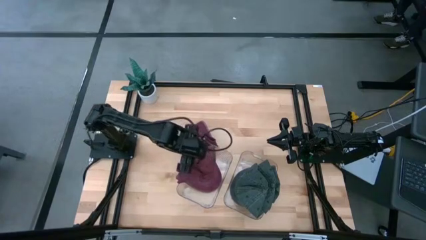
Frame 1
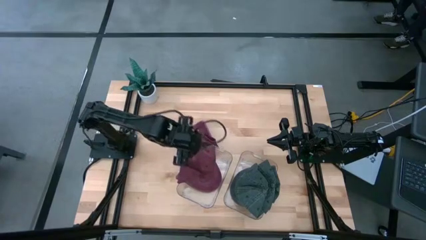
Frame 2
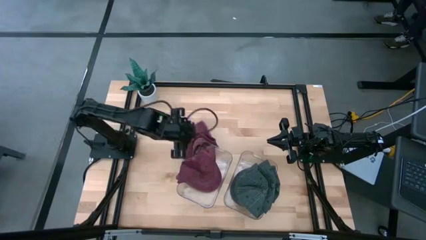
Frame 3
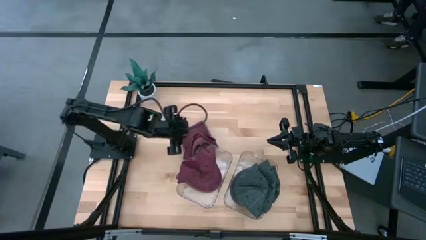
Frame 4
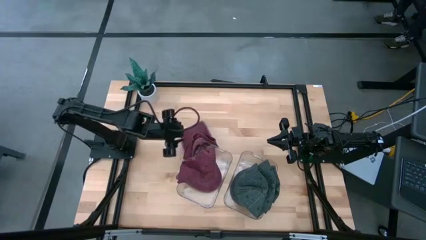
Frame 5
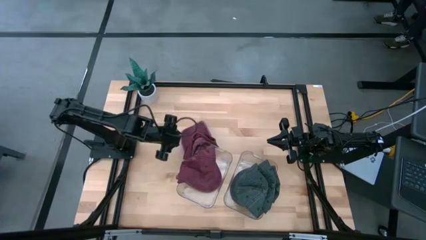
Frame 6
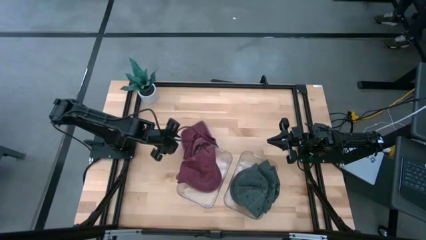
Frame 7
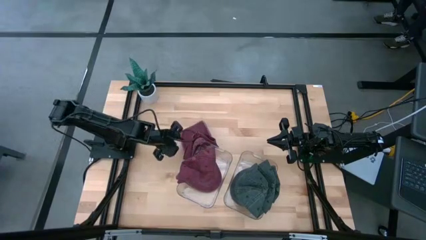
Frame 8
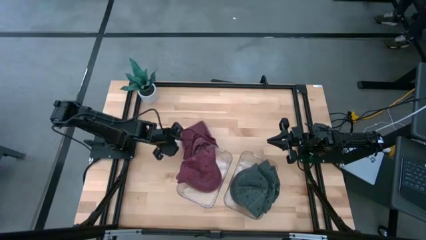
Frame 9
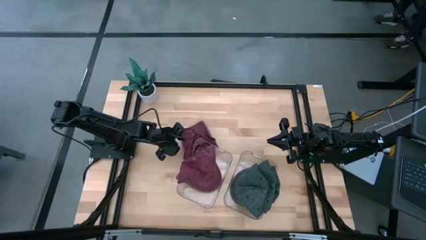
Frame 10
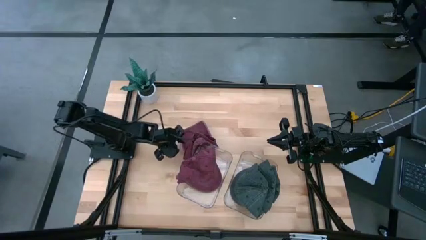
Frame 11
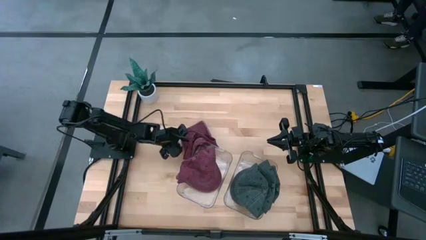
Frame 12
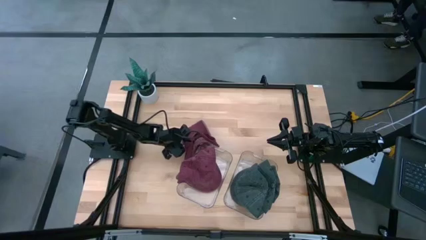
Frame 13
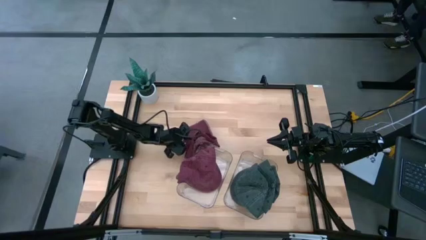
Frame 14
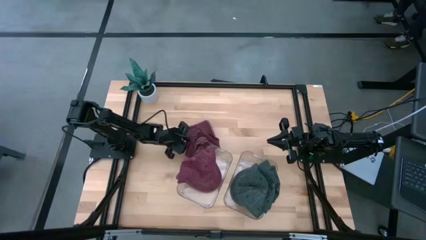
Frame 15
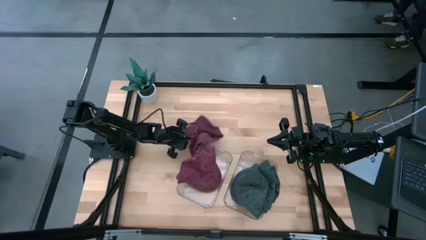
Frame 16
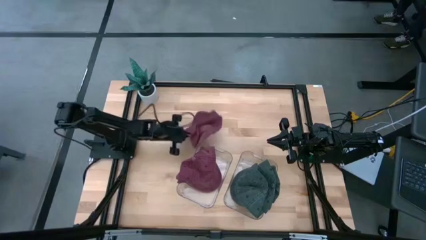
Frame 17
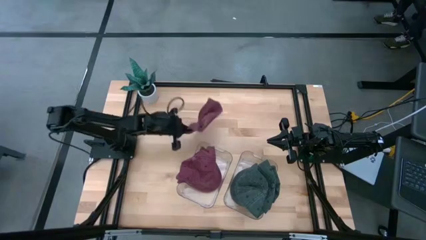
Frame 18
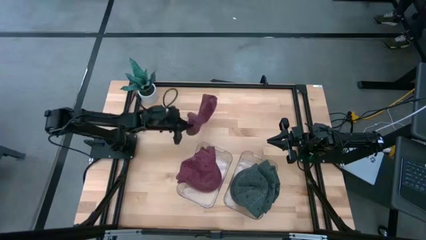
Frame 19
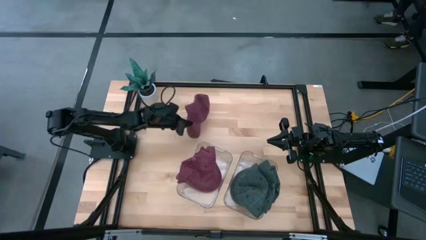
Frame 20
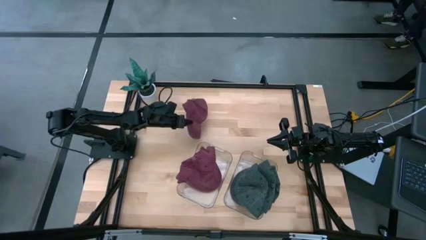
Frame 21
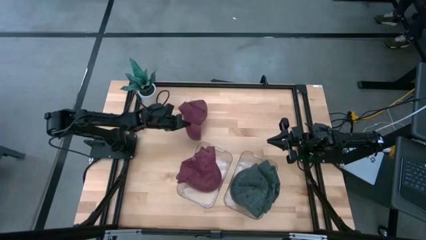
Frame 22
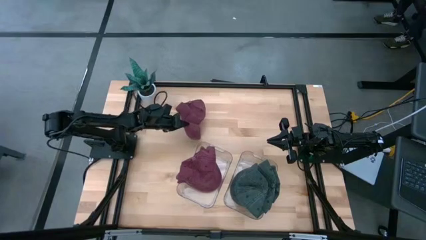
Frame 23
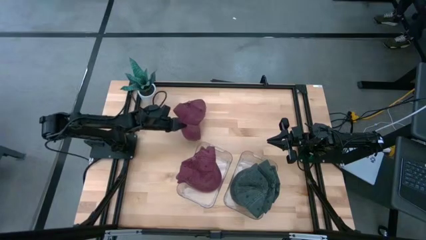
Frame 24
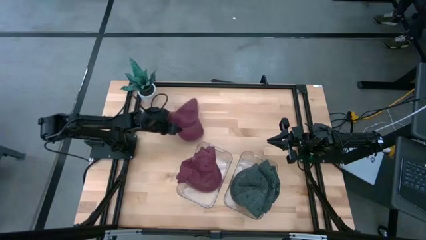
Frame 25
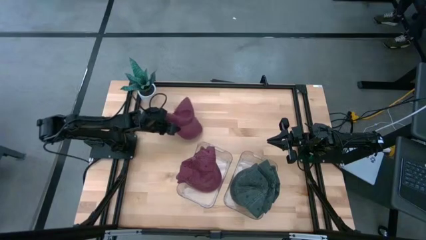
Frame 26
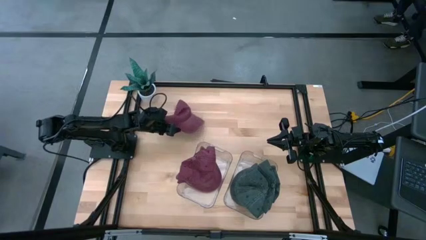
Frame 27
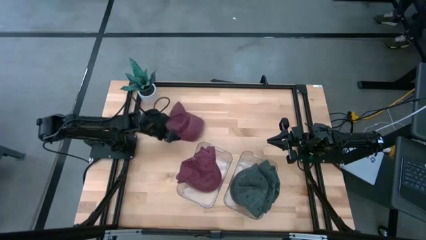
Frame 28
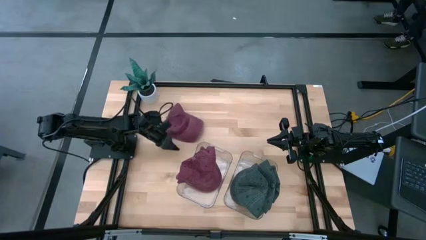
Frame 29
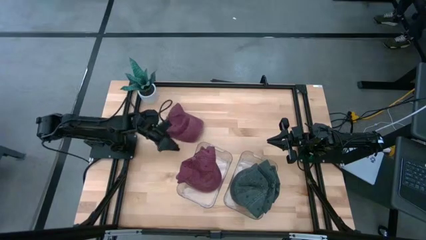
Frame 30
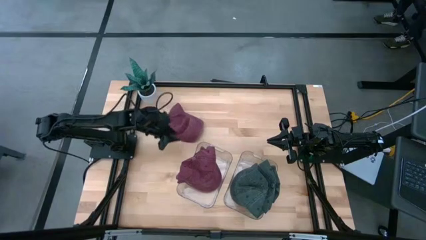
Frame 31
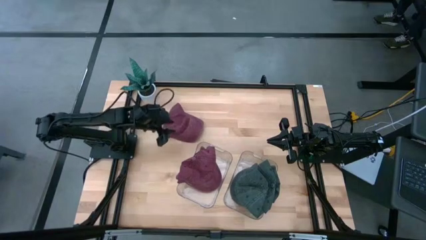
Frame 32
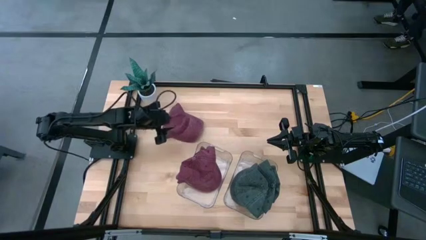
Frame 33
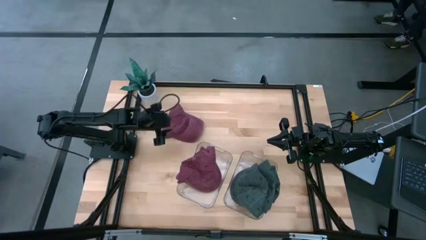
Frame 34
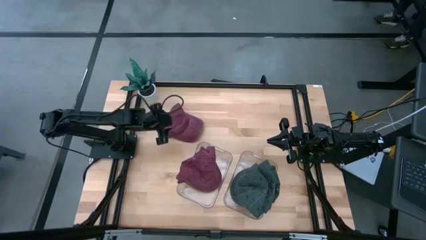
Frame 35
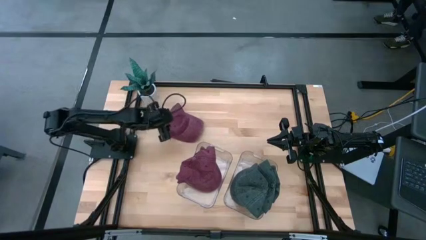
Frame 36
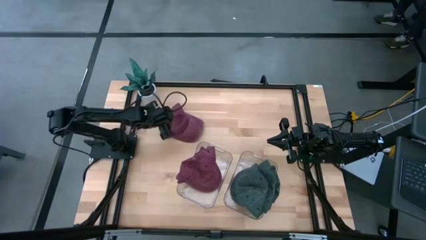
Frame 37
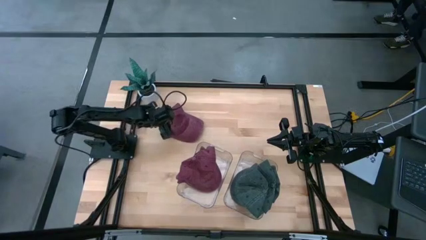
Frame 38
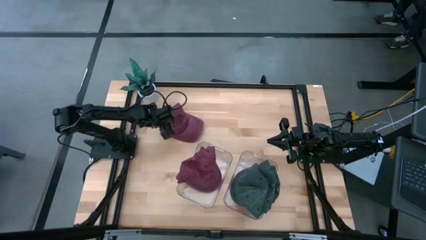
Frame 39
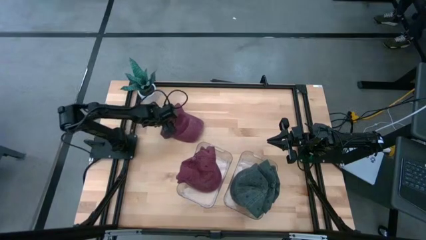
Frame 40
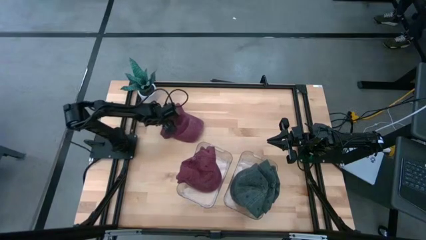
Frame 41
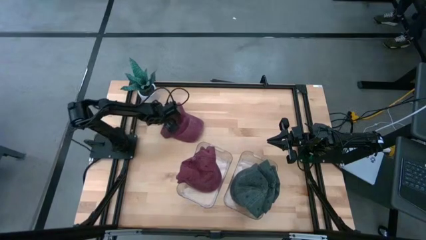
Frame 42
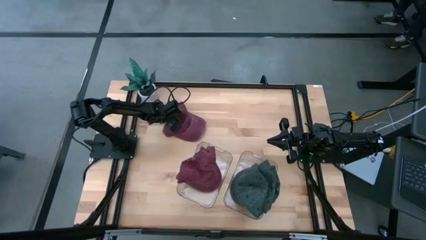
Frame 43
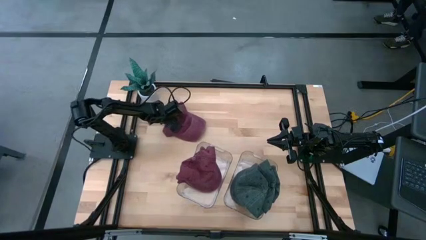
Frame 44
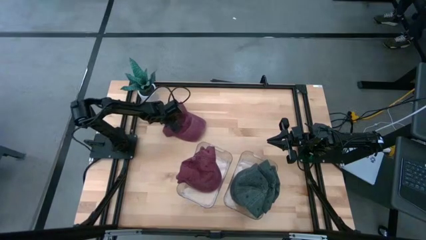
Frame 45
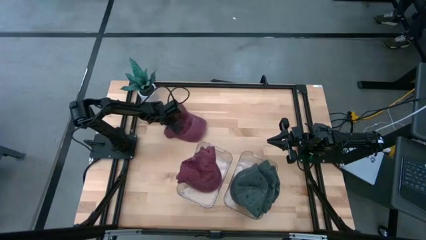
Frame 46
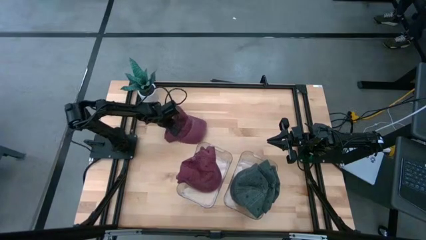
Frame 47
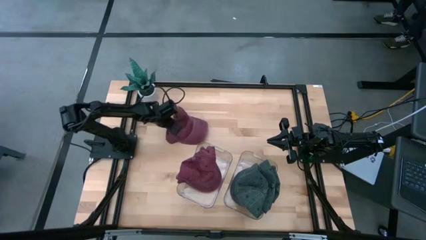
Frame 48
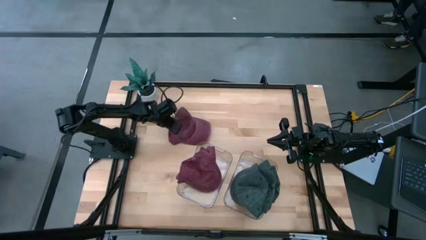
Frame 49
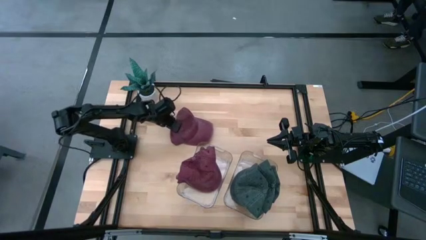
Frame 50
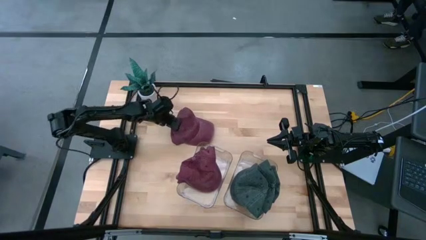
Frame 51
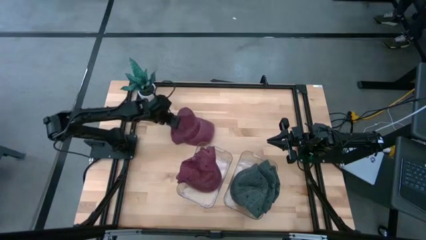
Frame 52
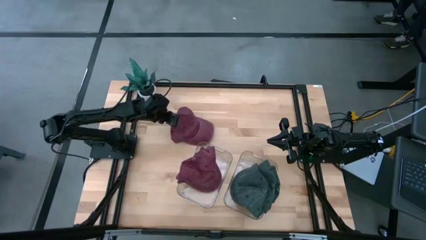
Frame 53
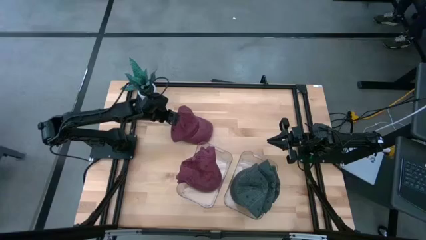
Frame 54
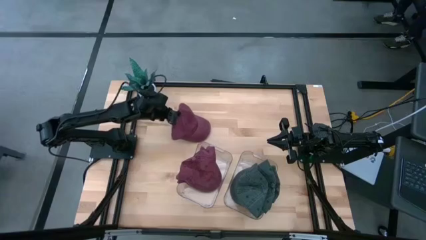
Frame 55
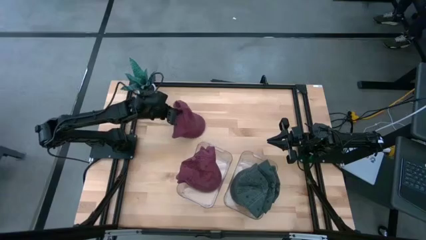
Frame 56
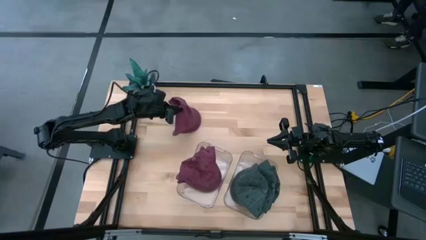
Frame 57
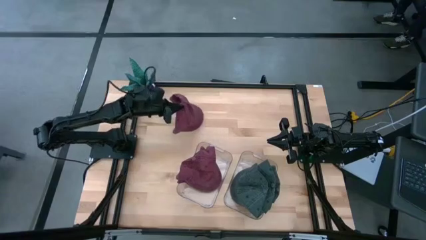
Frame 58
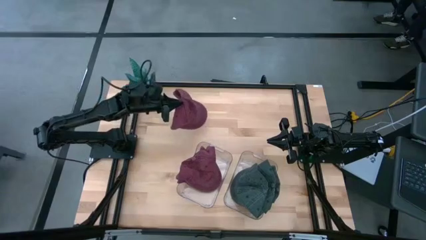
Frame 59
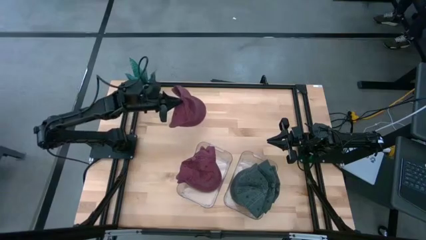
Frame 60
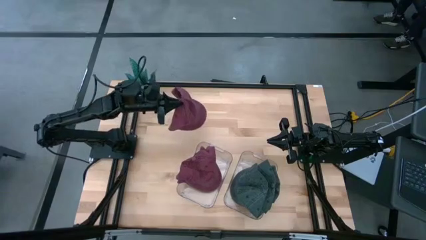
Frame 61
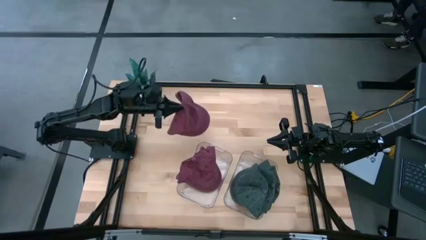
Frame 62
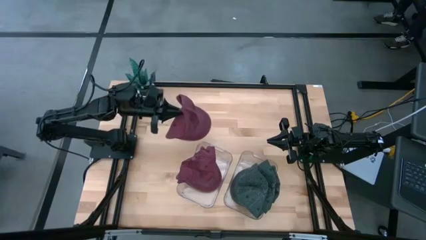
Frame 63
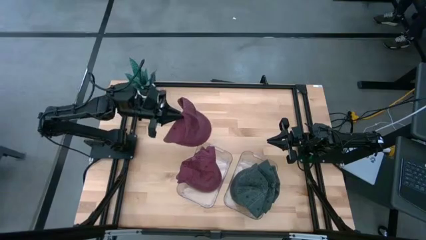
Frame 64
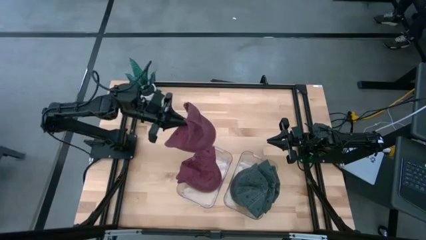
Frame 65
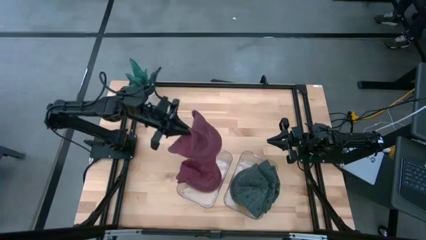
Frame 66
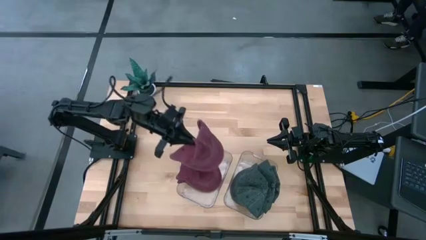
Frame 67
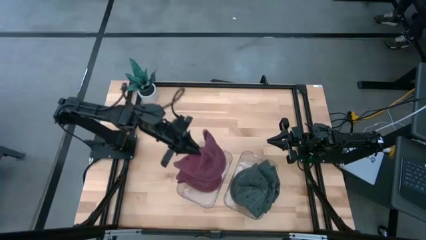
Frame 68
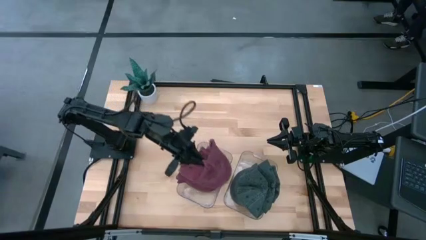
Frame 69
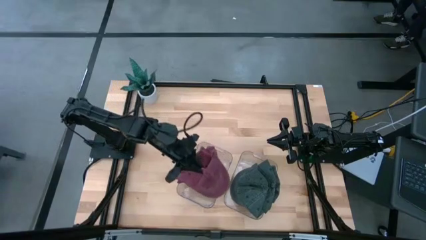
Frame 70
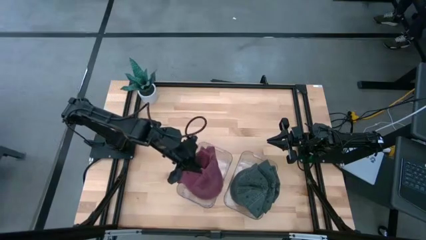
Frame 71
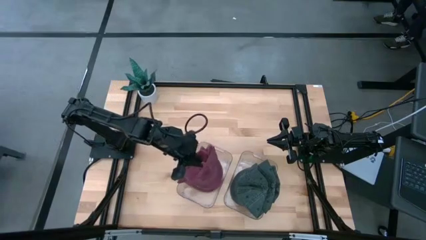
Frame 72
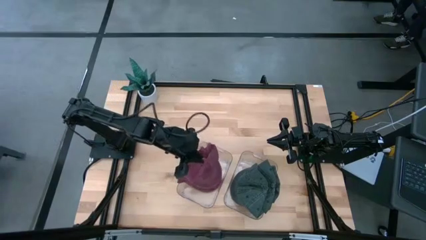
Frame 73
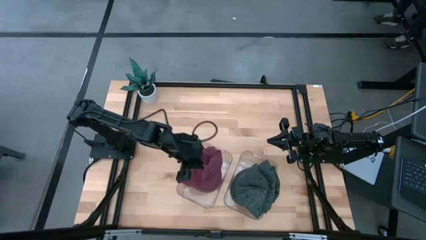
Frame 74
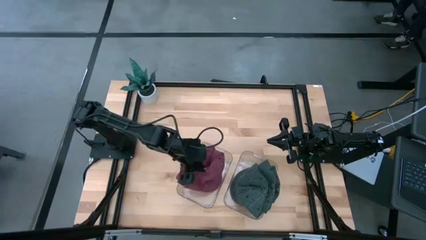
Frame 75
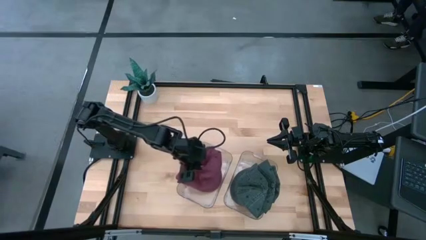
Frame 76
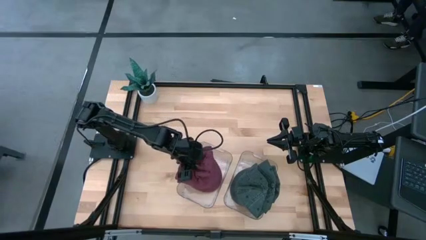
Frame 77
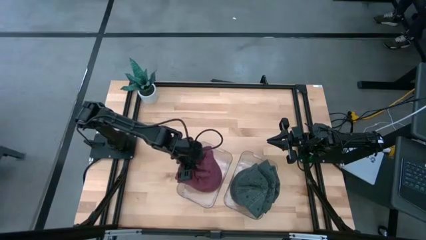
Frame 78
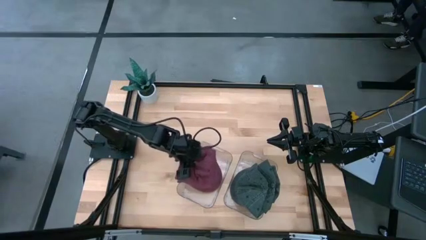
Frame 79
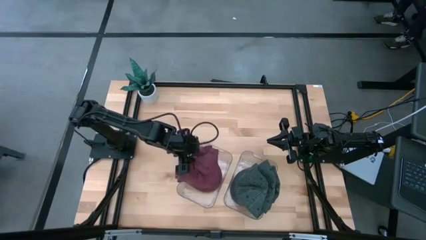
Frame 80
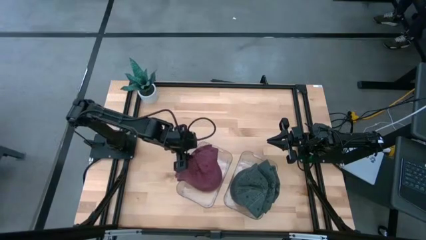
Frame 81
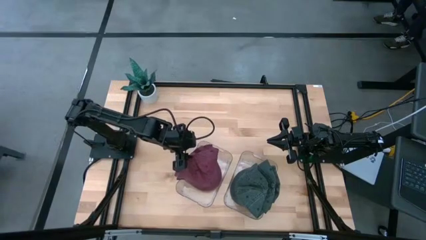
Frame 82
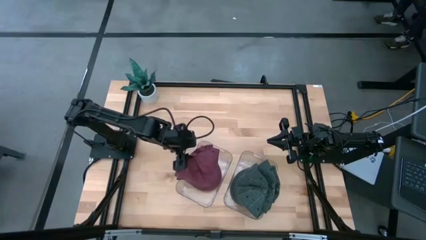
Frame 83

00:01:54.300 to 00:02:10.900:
Task: Pick & Place hat
Put the red cap into the left transparent bin
